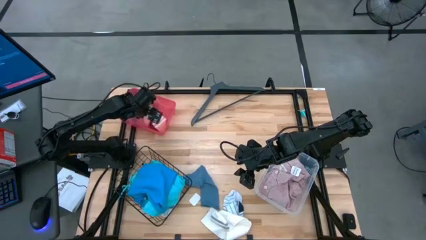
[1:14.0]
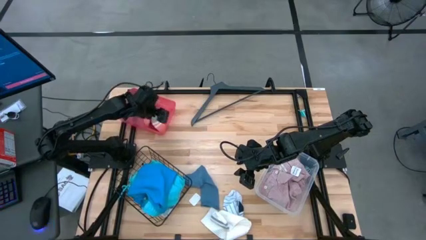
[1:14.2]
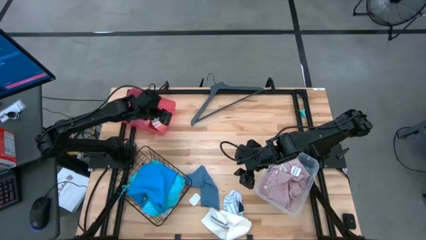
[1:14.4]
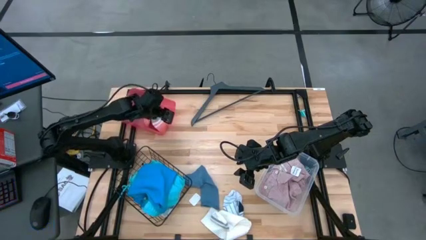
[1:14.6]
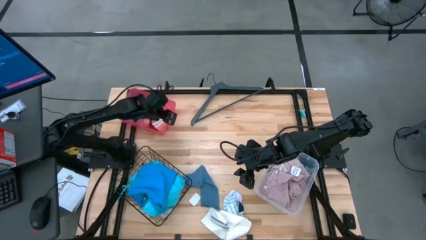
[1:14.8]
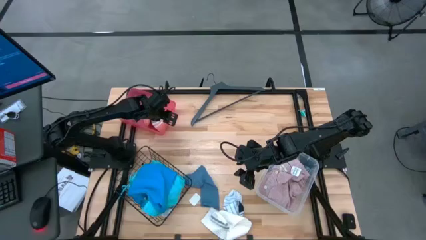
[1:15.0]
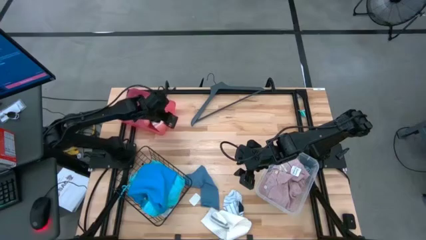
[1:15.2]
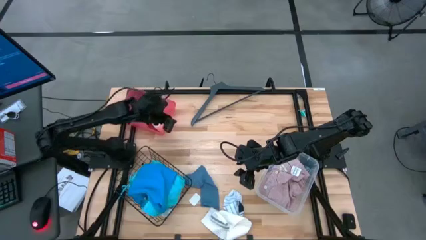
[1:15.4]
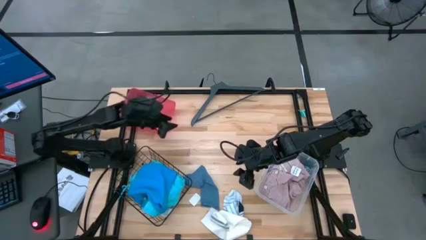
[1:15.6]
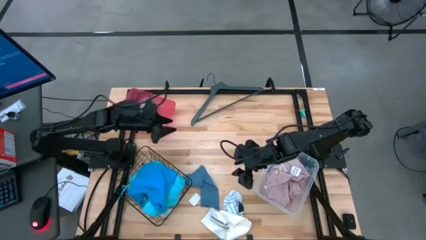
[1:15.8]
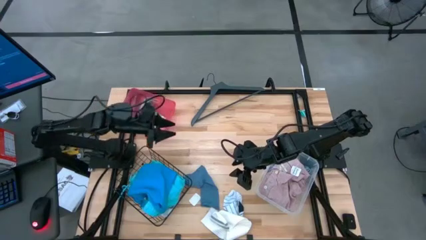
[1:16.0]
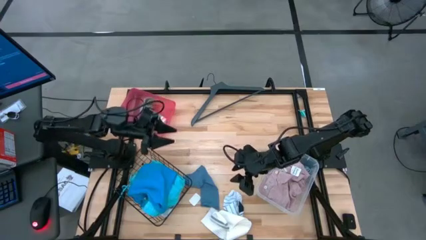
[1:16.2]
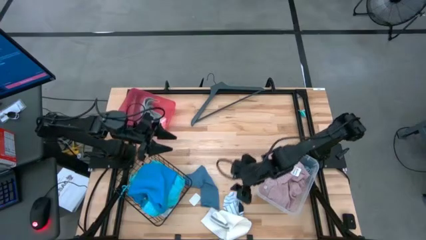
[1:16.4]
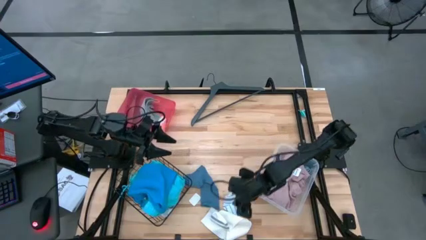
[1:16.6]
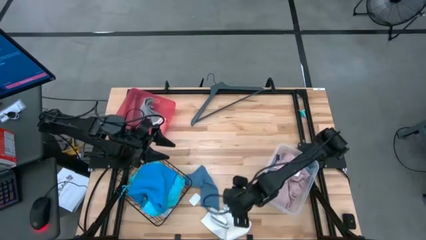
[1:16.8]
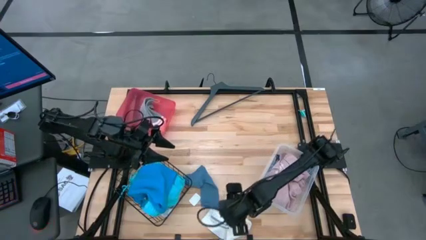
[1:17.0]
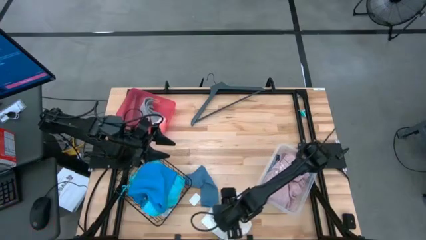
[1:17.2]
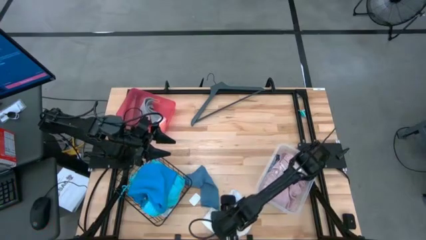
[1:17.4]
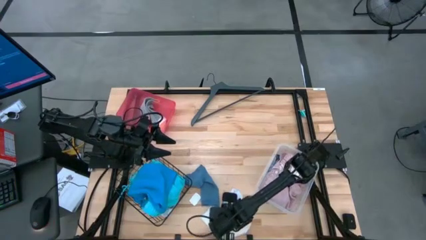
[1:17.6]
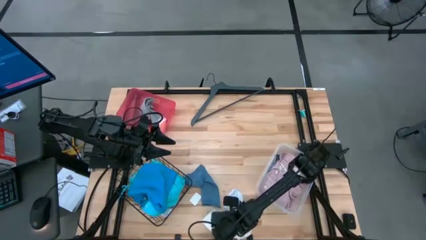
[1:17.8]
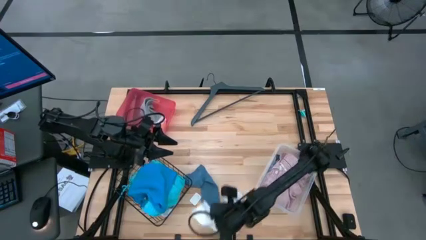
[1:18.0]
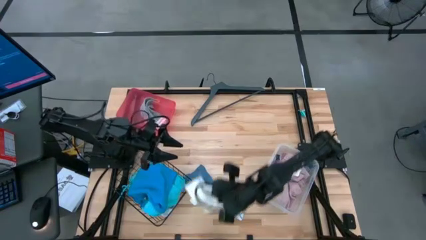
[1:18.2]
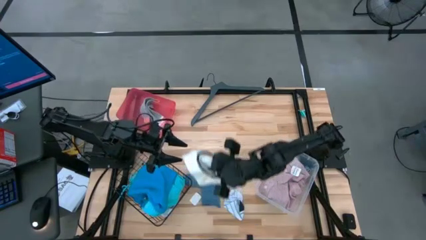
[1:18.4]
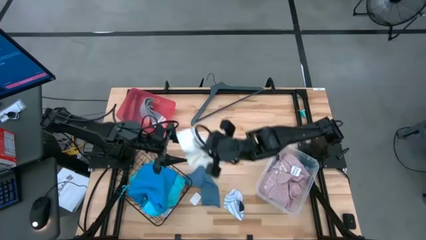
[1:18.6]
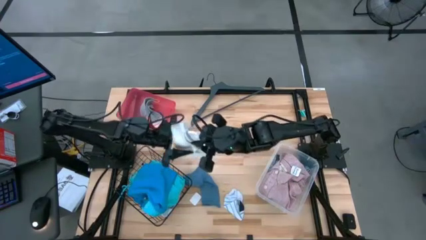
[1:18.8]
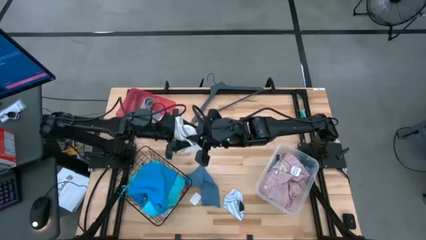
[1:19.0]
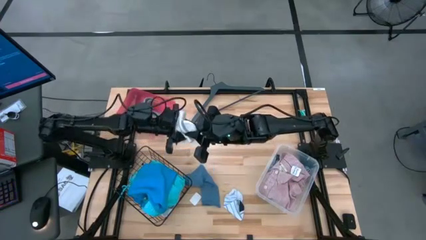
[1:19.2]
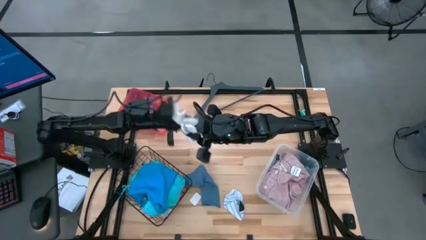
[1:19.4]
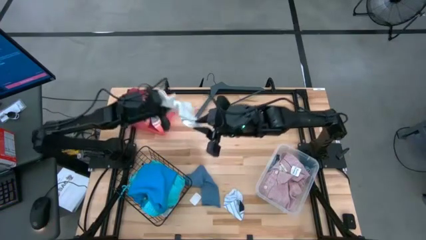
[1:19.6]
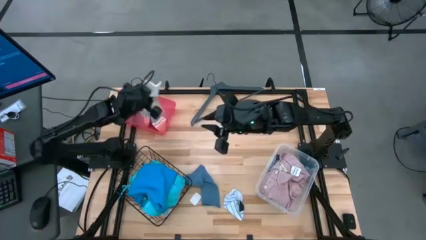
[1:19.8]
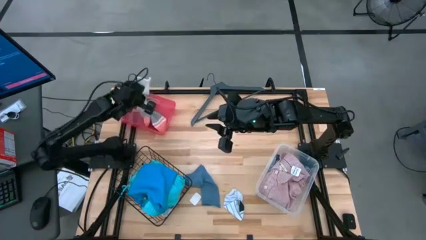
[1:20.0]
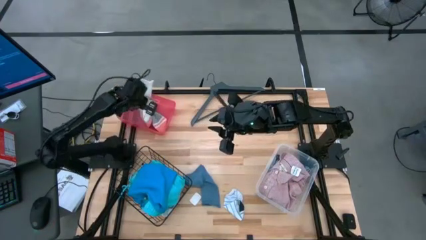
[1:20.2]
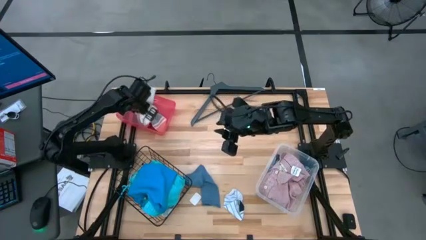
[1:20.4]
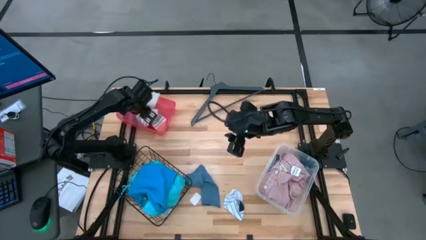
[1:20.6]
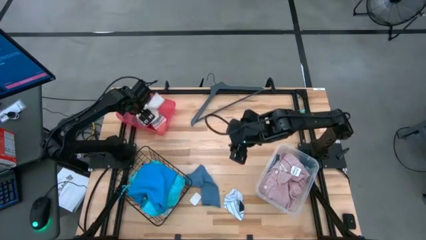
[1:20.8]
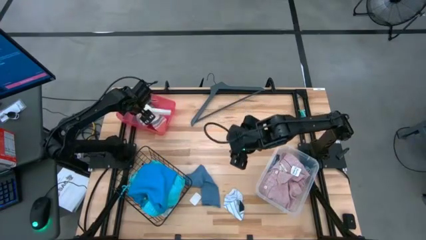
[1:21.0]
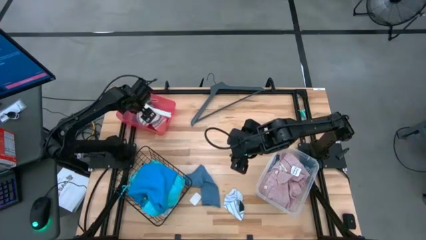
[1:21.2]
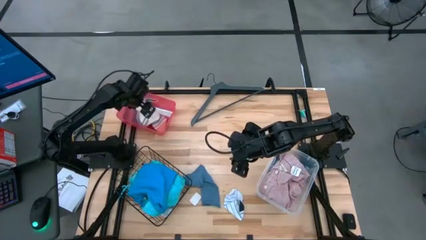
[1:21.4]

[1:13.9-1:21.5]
Task: Pick & Place Cloths
Put the white sock into the red bin

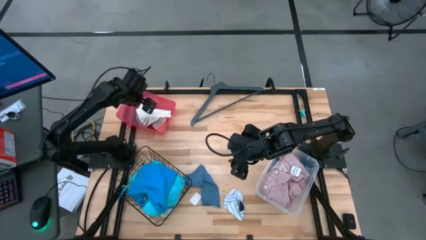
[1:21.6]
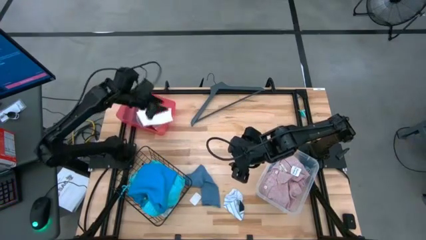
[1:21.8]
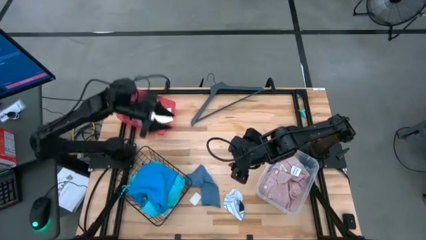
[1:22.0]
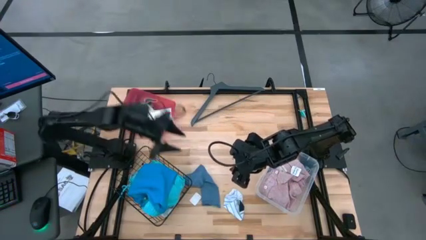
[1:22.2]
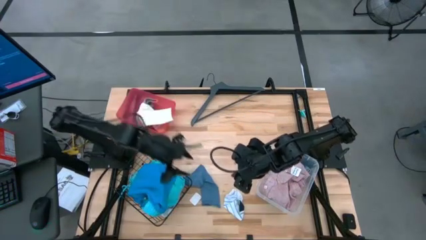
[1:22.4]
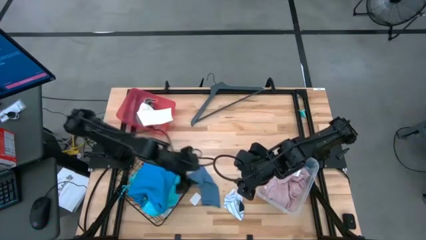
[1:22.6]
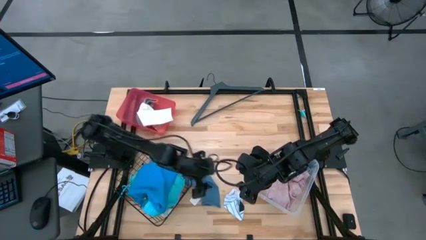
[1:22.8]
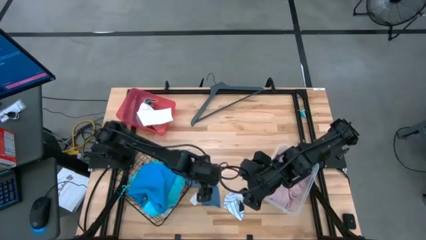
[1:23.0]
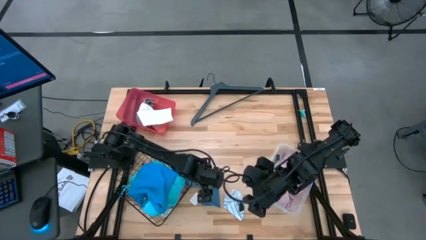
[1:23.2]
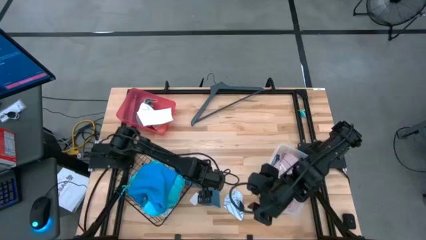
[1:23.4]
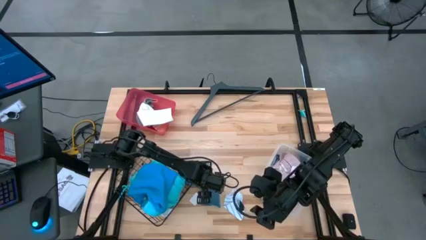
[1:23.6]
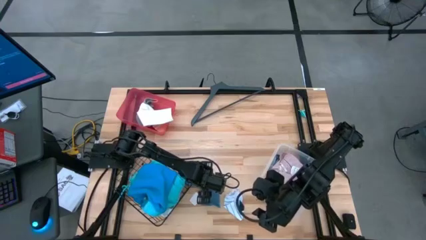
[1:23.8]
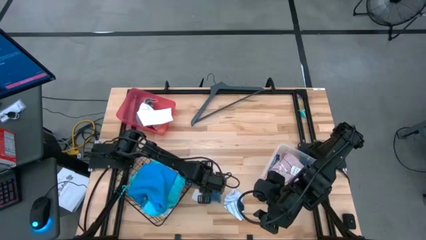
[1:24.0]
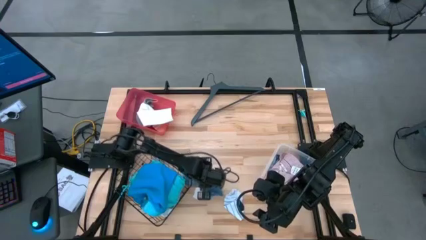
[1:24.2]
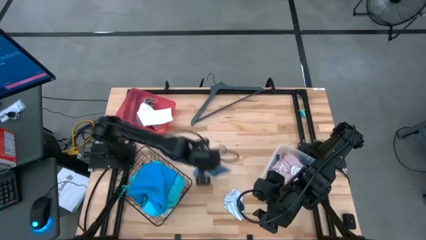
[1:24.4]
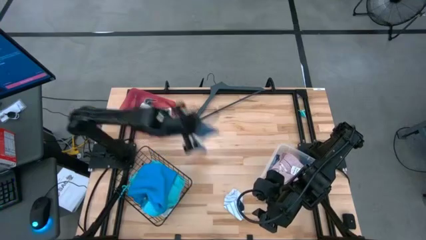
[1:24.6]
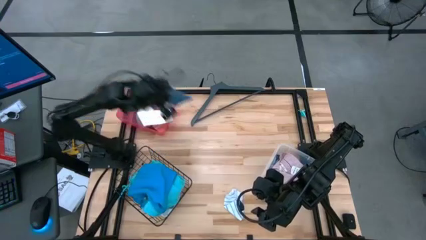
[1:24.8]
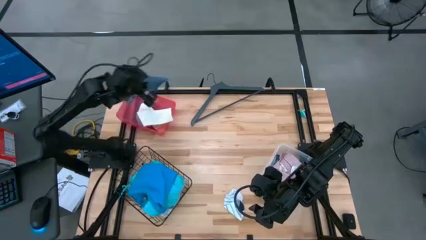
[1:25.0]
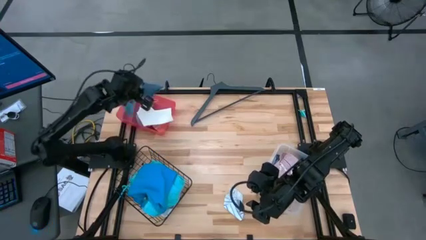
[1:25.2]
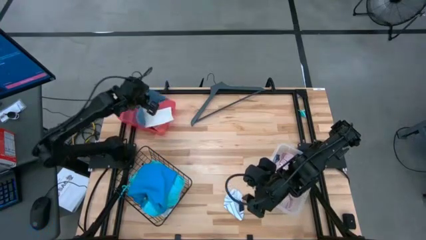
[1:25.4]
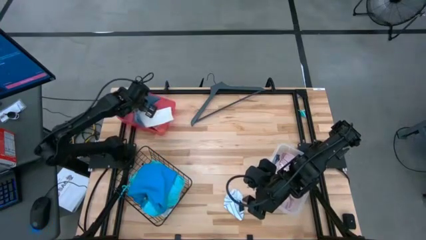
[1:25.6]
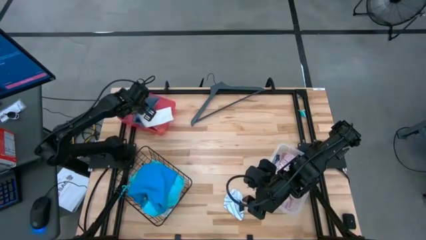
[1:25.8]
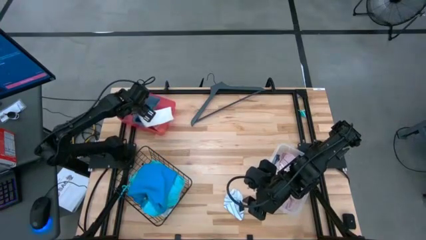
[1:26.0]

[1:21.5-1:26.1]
Put the dark gray sock into the red bin

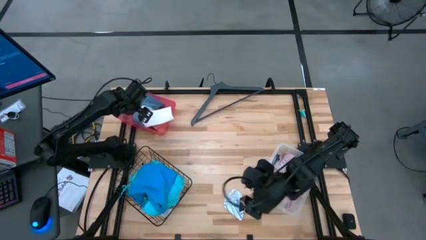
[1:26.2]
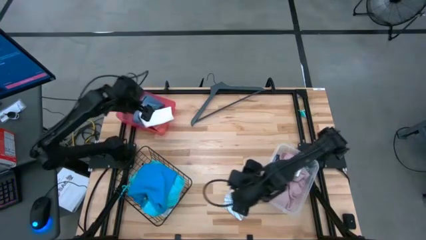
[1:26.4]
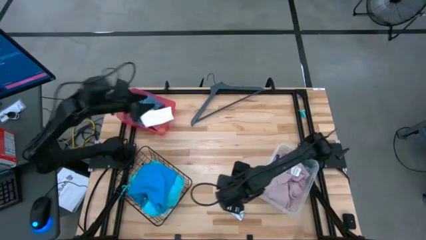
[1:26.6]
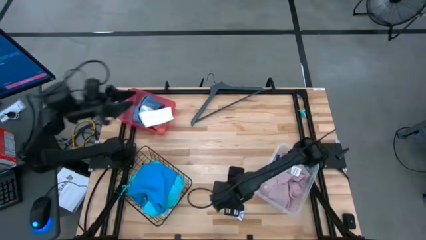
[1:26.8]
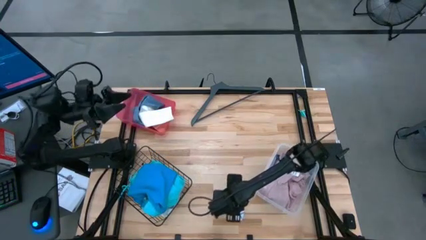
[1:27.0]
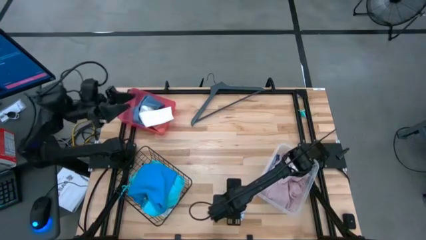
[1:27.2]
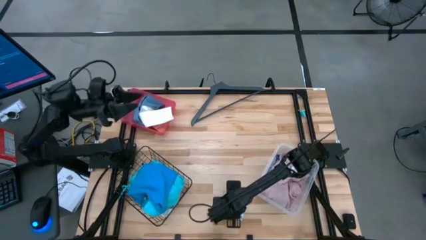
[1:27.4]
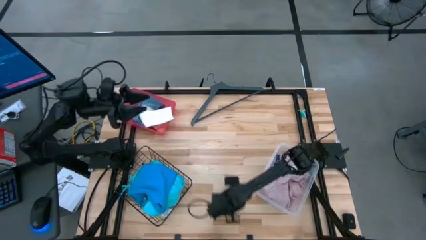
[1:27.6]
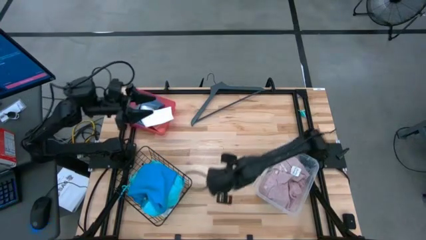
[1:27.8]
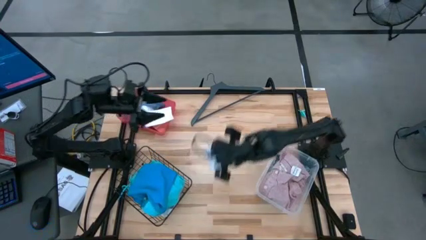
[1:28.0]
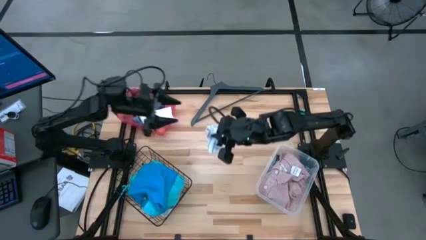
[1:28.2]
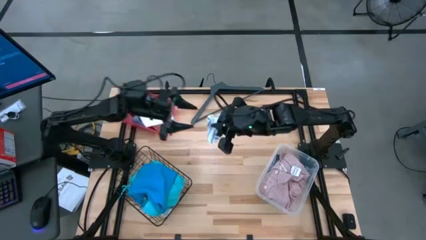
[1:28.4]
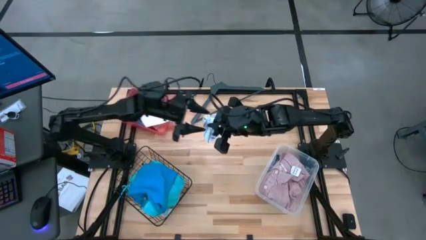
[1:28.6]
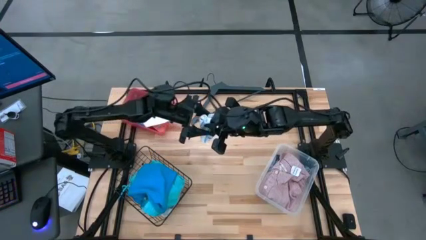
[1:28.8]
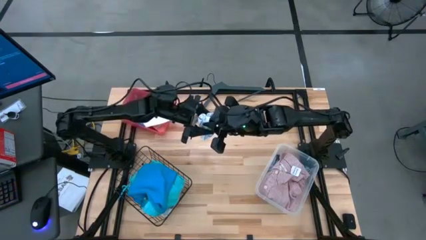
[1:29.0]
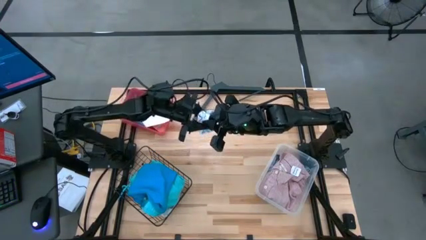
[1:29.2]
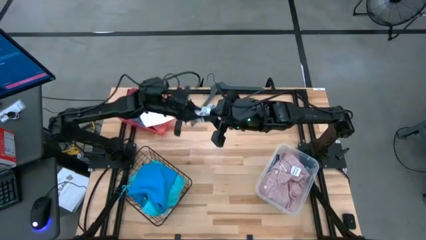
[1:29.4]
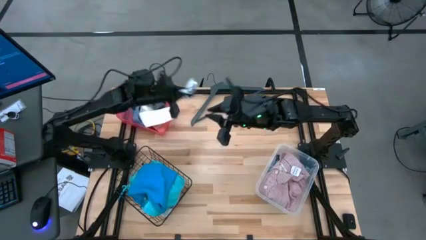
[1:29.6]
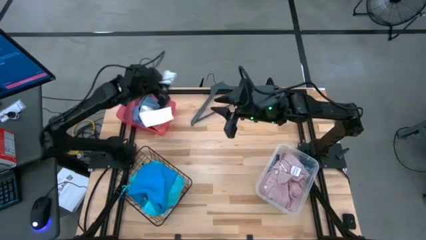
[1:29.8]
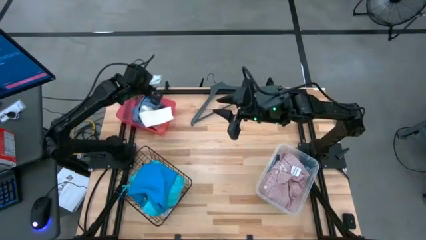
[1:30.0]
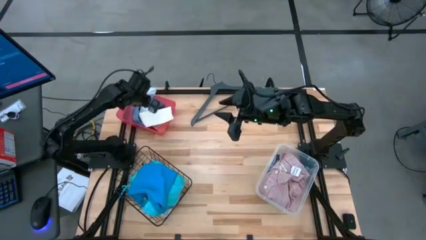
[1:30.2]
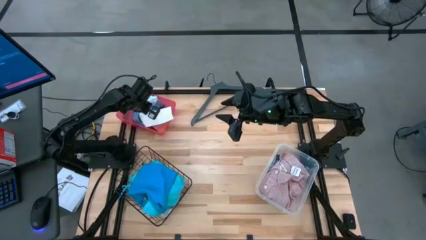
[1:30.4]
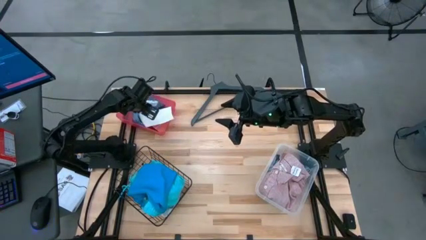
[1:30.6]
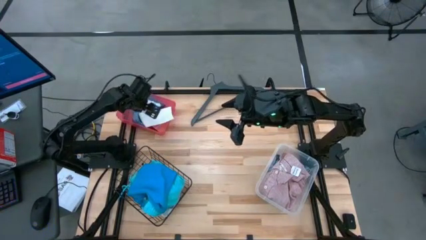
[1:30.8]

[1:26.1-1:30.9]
Put the white striped sock into the red bin
